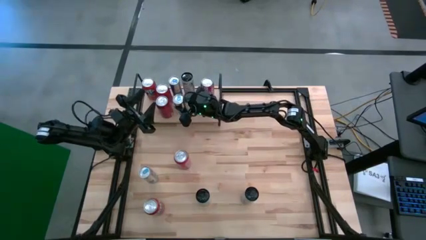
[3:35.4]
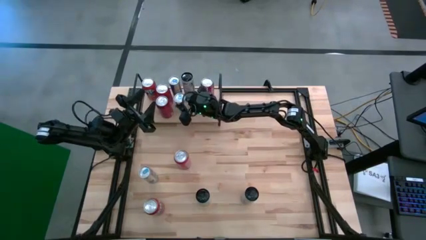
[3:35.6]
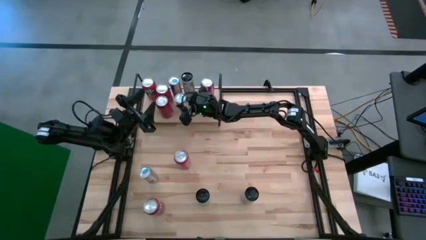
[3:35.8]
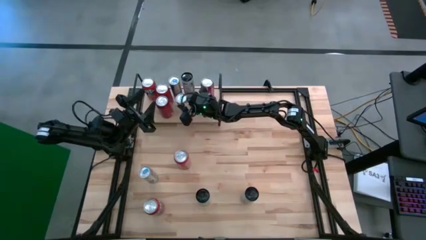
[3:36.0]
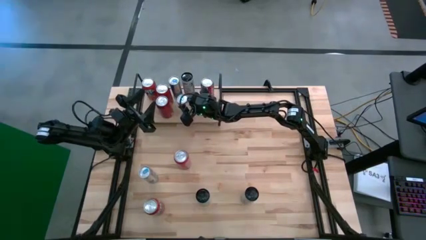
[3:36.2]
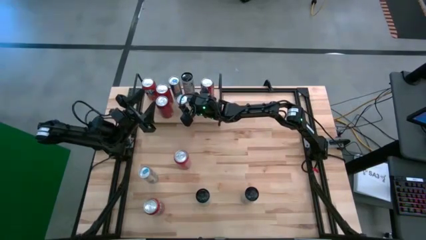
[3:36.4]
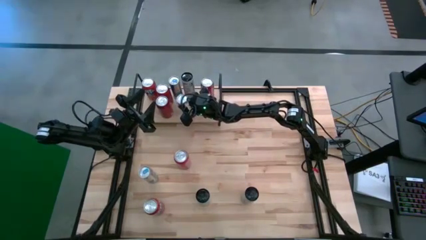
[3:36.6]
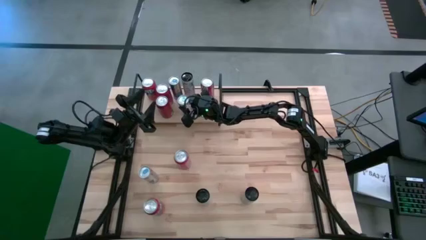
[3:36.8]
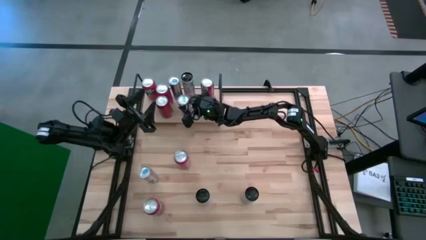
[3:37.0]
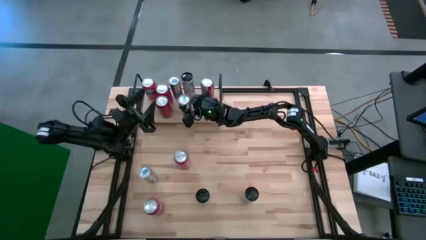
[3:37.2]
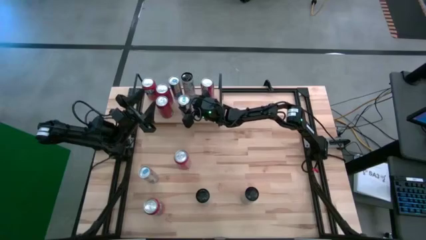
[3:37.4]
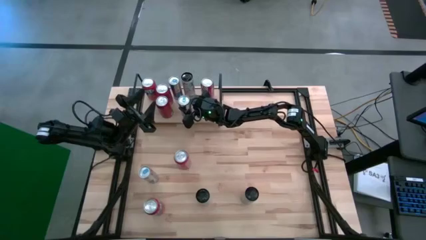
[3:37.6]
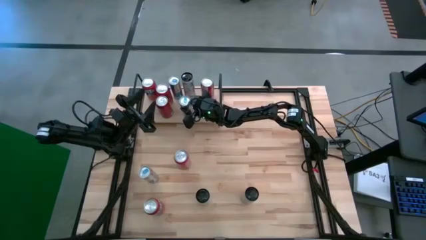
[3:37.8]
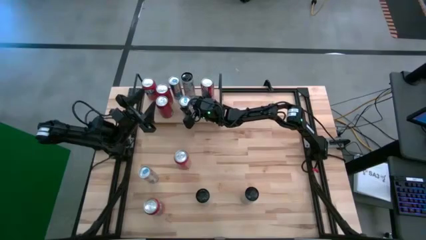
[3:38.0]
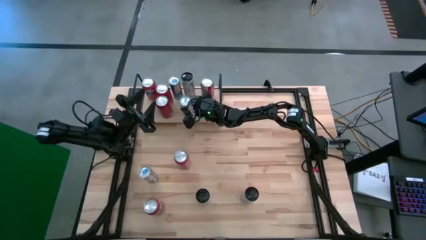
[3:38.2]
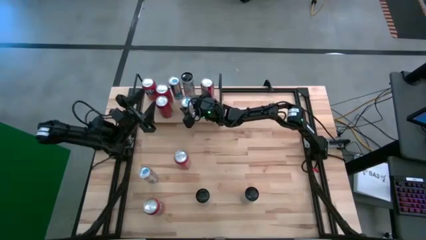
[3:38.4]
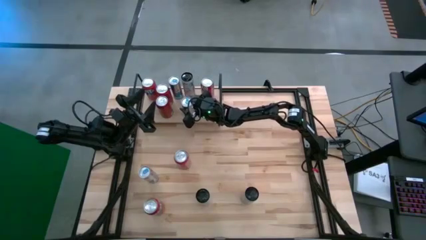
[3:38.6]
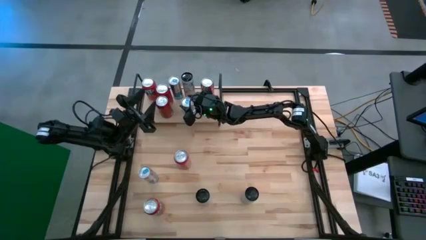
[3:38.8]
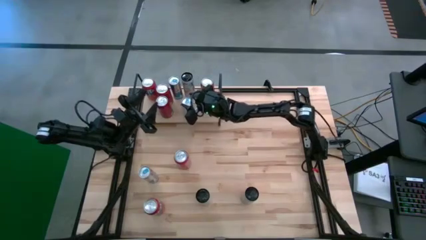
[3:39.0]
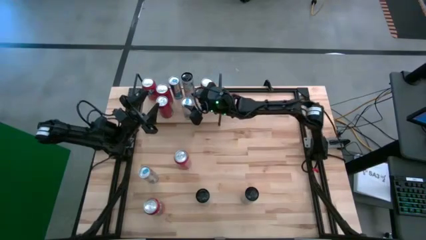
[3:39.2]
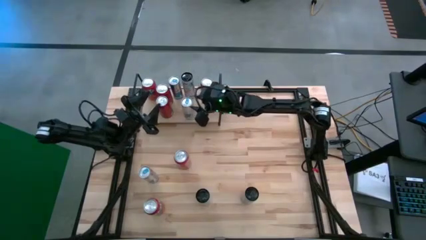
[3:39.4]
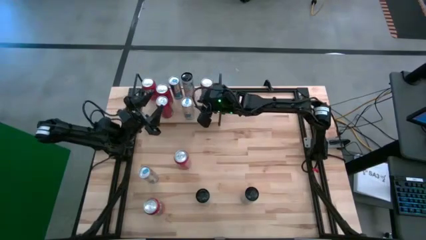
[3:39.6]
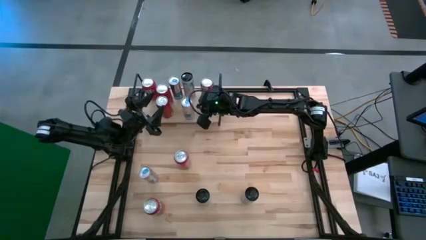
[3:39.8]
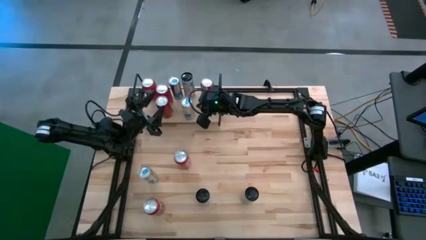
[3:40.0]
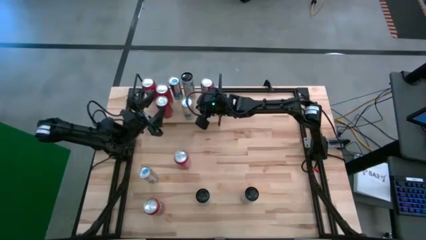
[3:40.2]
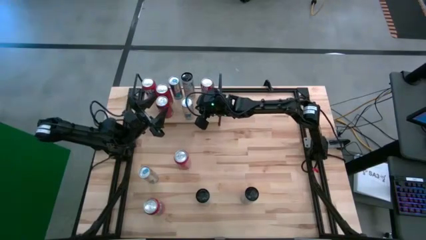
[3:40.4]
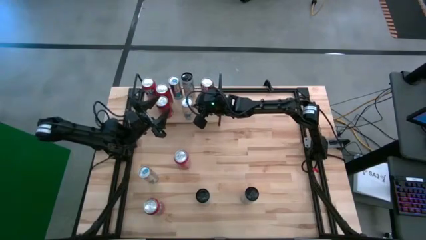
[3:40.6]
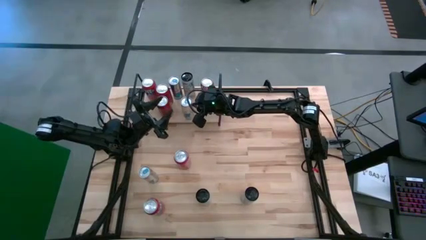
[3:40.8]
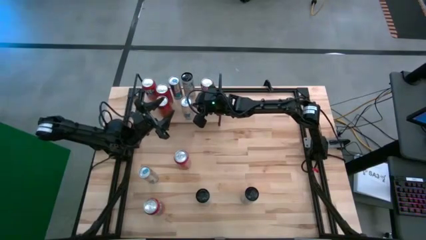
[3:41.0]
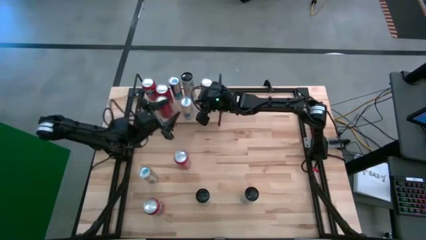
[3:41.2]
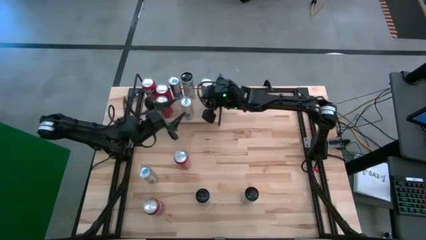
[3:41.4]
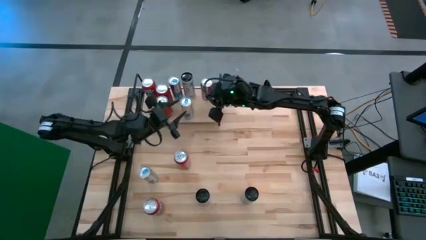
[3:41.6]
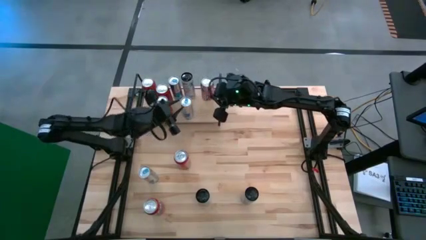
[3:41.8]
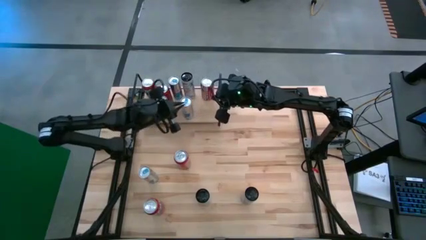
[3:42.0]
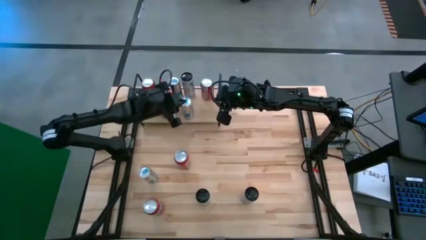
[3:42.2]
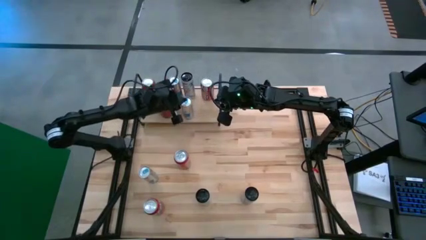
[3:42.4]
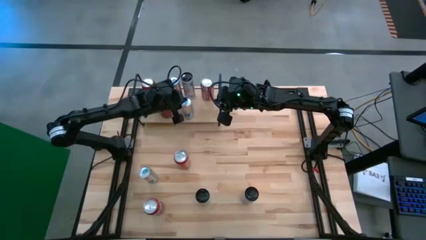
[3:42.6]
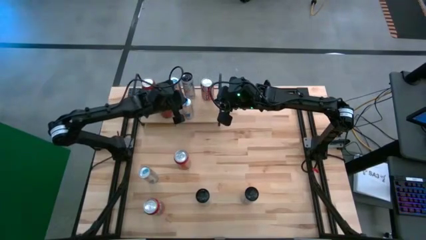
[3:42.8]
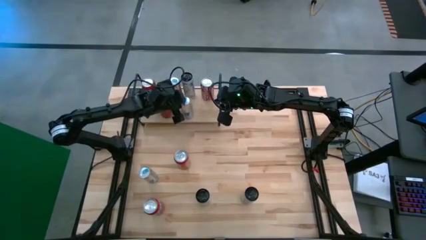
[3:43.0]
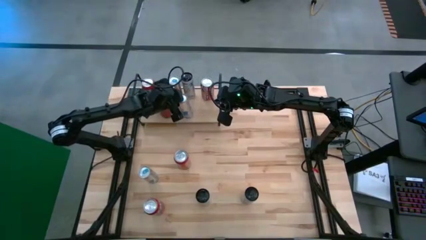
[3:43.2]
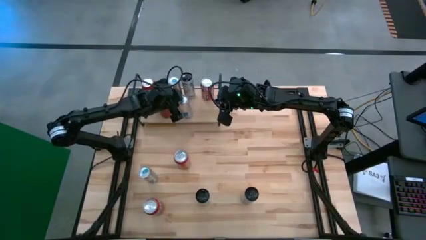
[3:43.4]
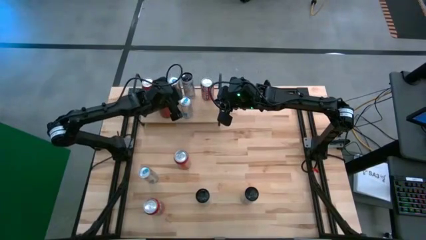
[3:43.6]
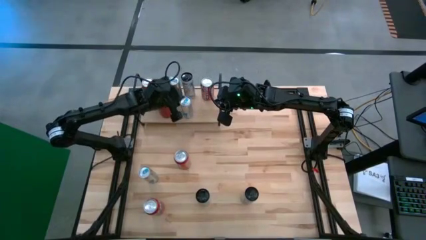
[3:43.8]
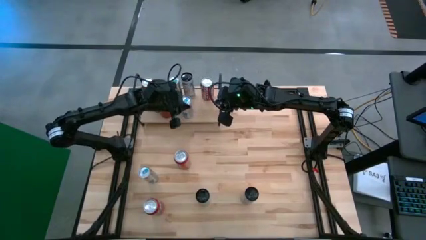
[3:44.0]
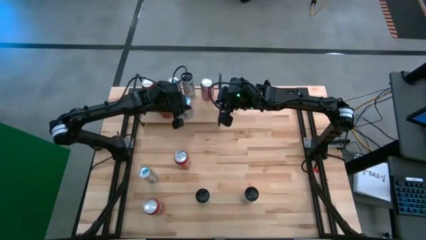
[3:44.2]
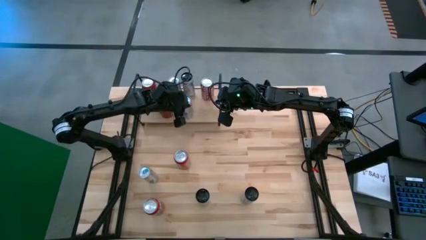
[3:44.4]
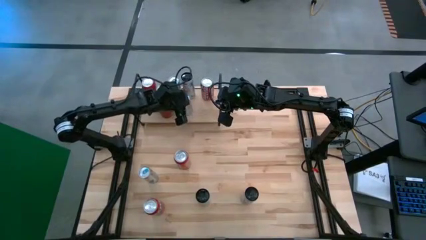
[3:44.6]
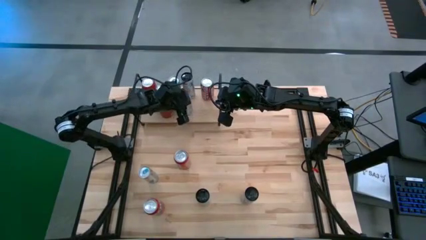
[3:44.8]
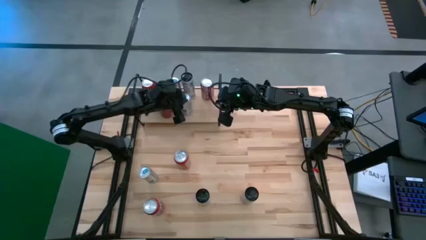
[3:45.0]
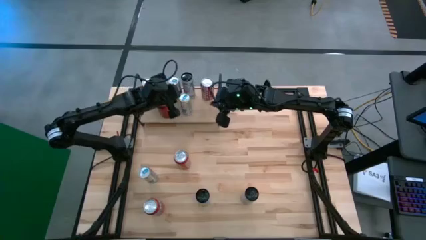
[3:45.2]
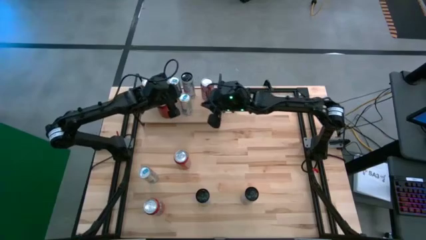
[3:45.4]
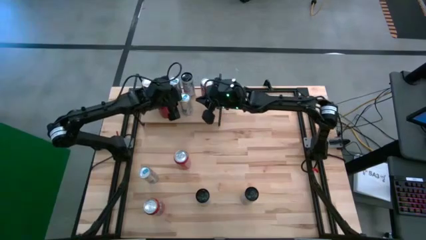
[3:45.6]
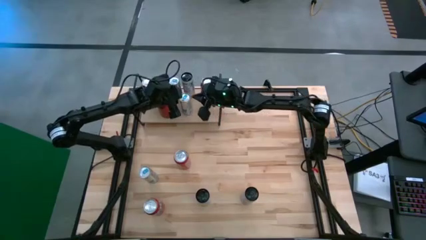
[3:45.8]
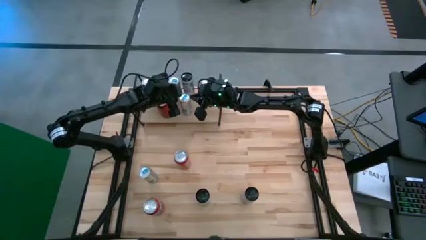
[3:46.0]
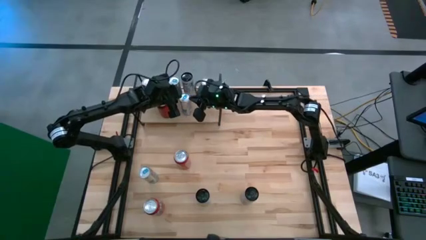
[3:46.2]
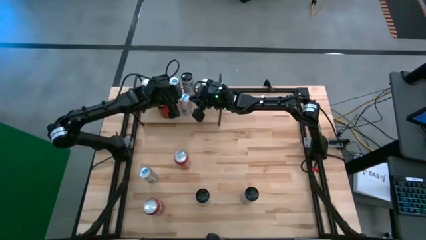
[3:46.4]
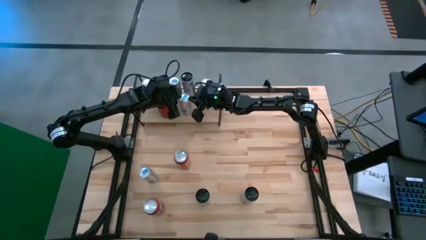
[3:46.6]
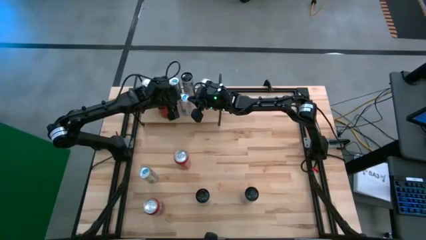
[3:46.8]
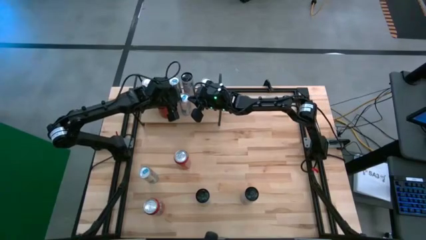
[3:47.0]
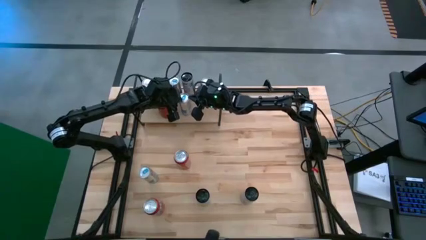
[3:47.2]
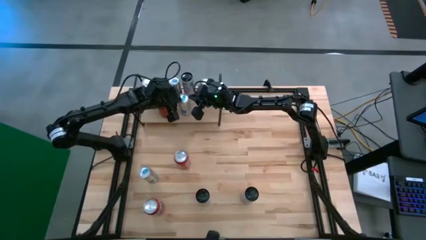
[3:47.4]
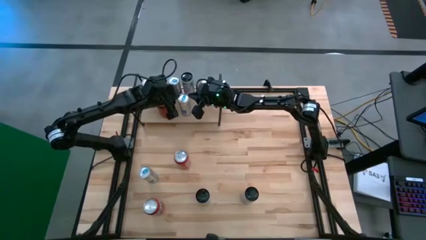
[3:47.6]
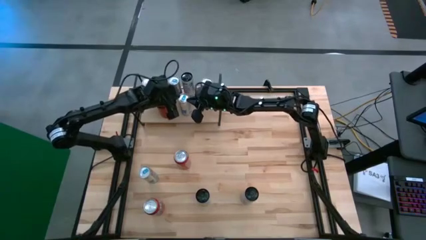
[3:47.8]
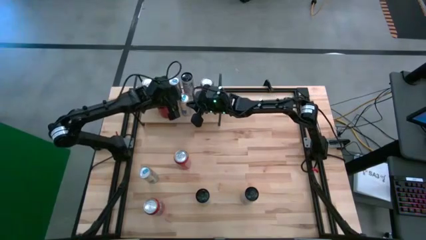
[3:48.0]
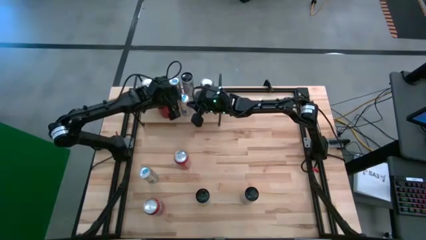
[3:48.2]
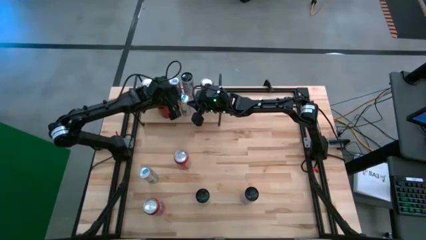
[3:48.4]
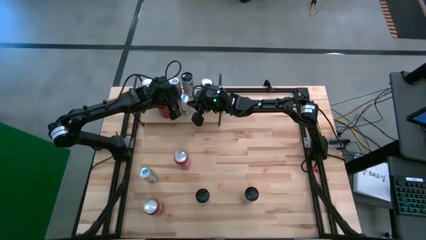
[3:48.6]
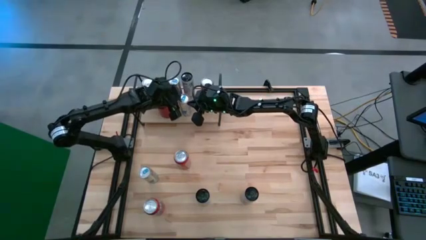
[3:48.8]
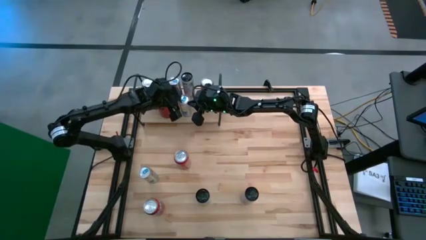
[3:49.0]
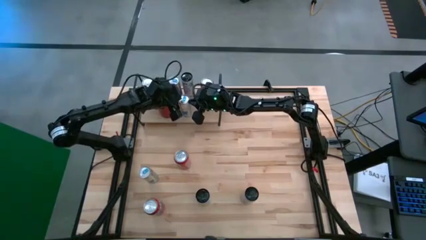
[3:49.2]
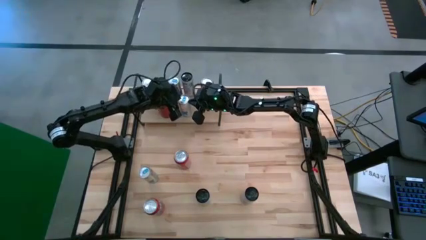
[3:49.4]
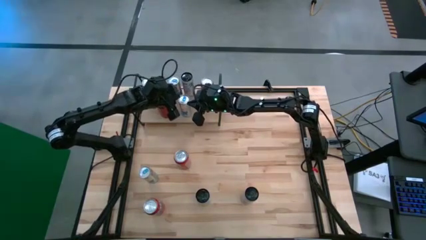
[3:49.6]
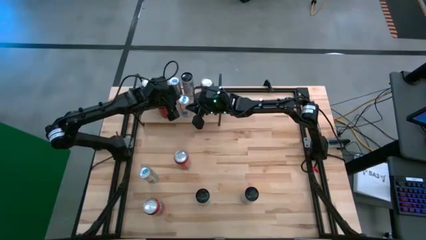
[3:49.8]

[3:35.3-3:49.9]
Task: Place canned beverage on shelf
Put the right blue soda can on the shelf aligned with the other blue soda can
